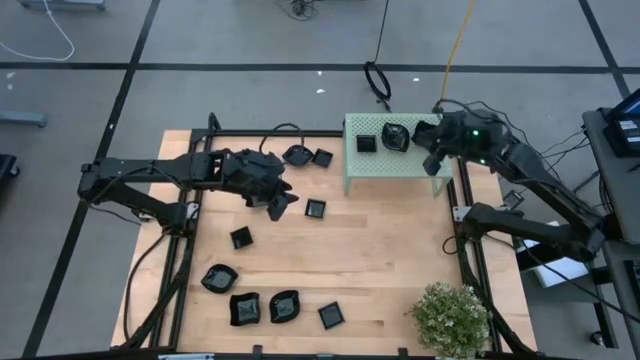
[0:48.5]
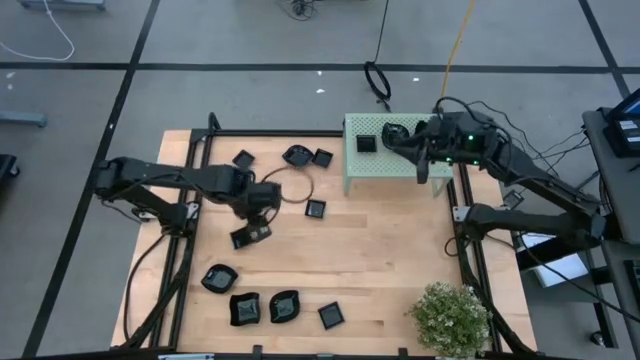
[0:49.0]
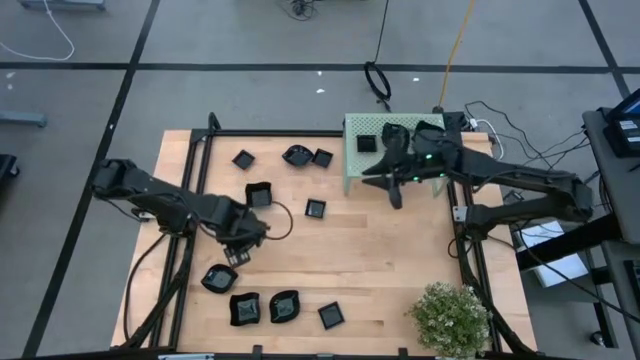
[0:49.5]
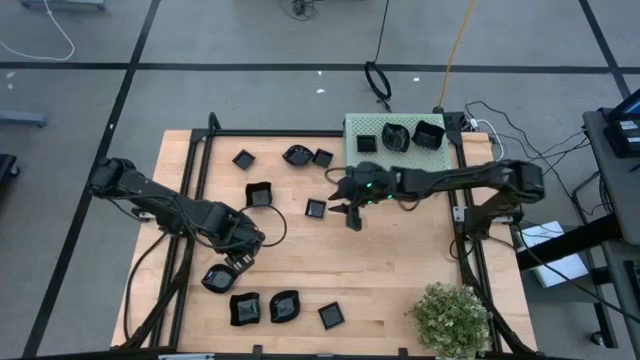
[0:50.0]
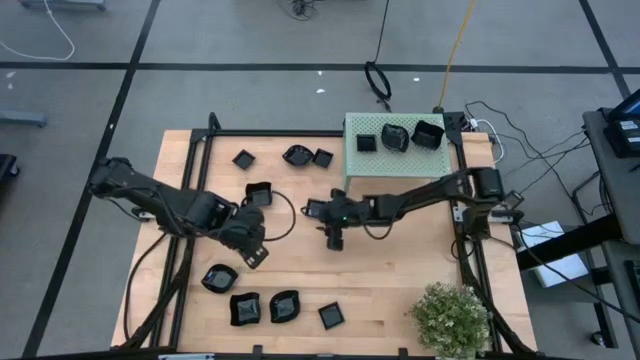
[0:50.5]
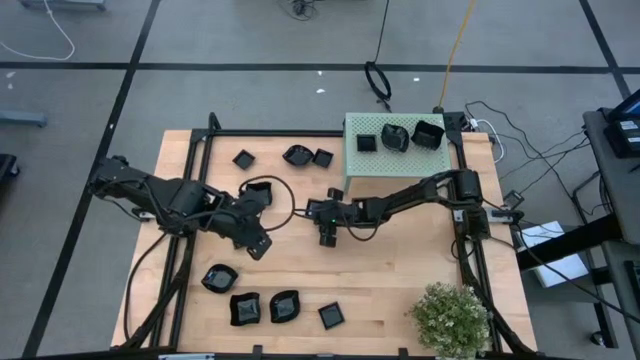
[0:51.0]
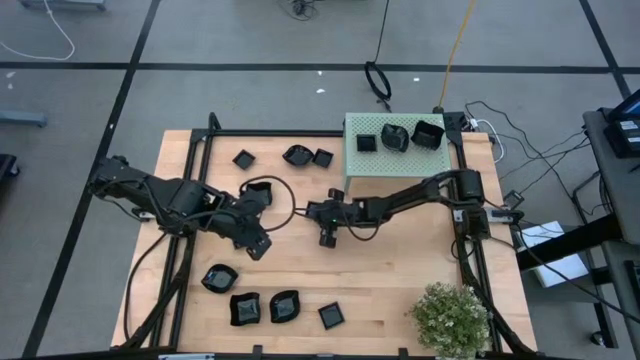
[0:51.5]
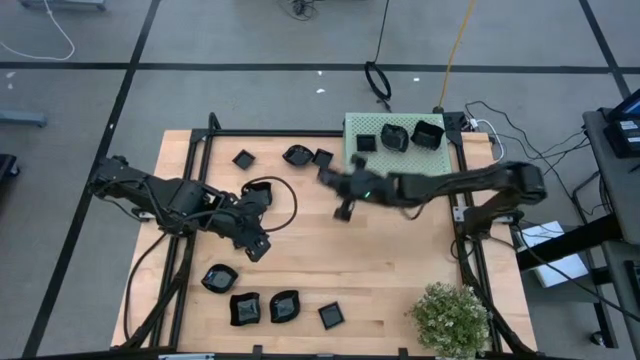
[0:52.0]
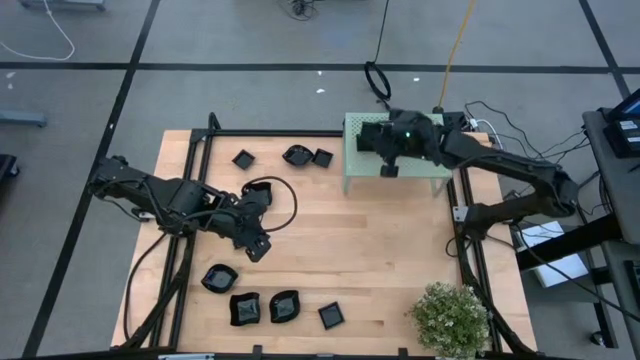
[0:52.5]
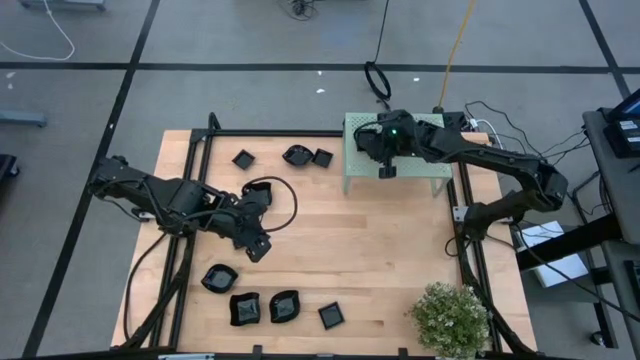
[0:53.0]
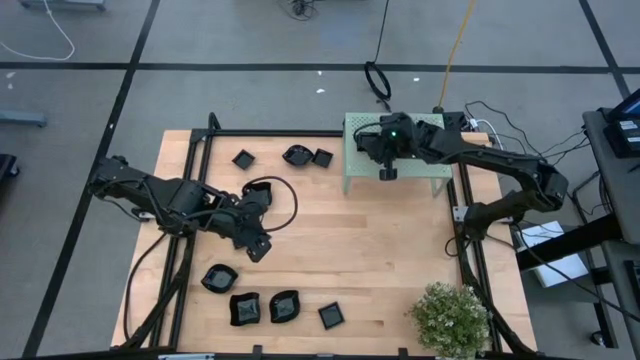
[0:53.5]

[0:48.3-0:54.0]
Task: Pick & Place Mini shaped plates
Stack the square plate on top of the square plate on the shelf

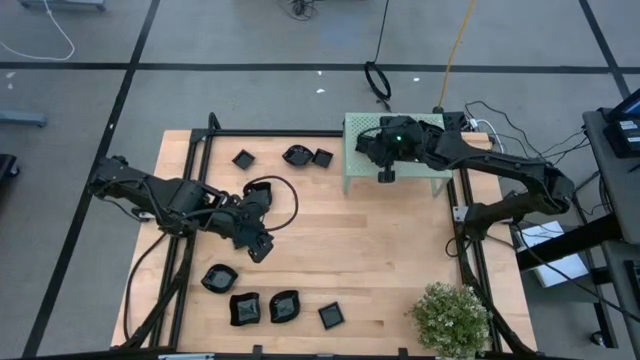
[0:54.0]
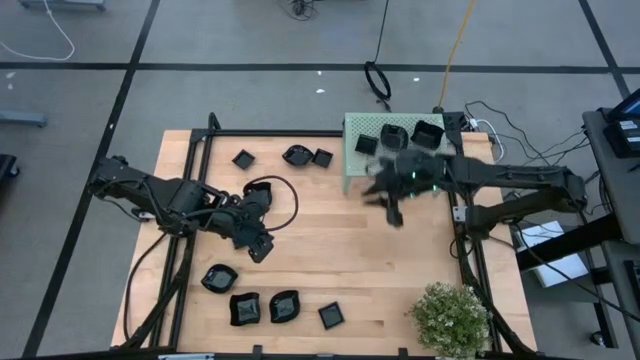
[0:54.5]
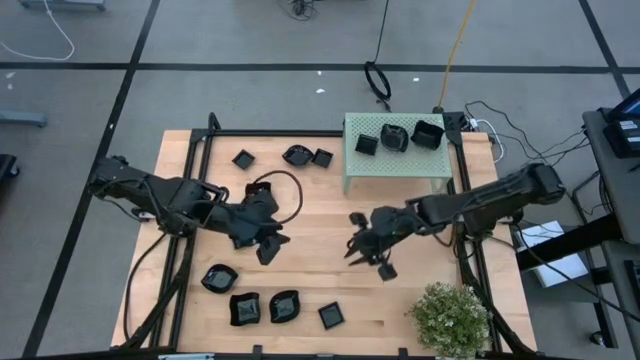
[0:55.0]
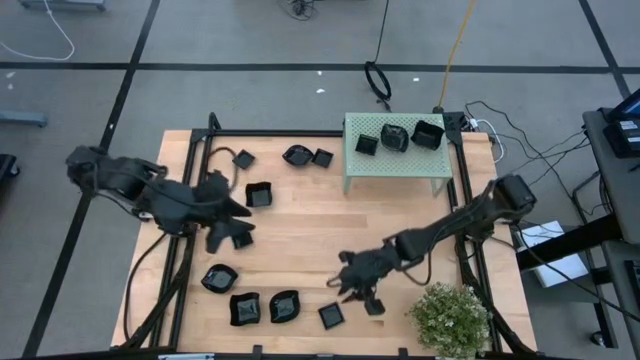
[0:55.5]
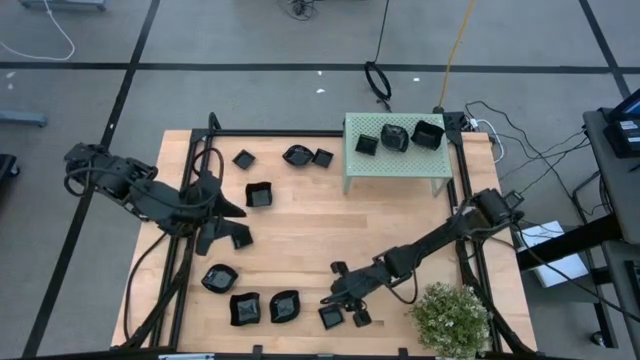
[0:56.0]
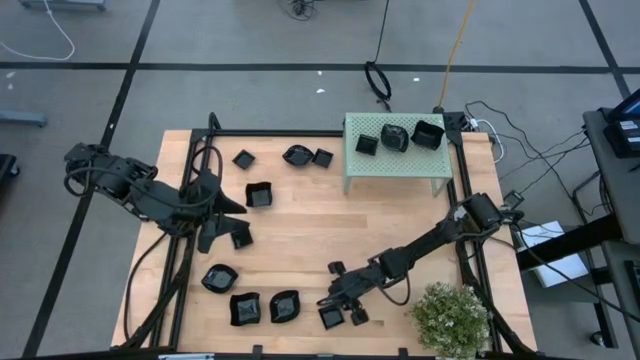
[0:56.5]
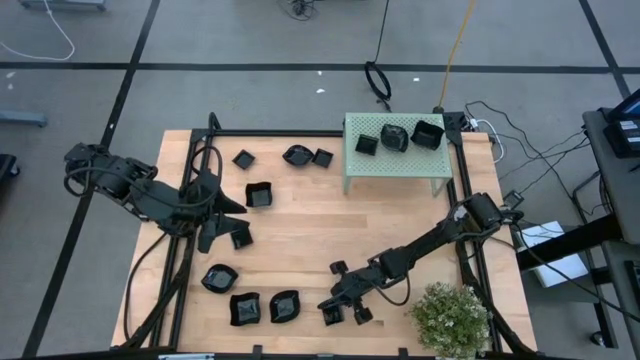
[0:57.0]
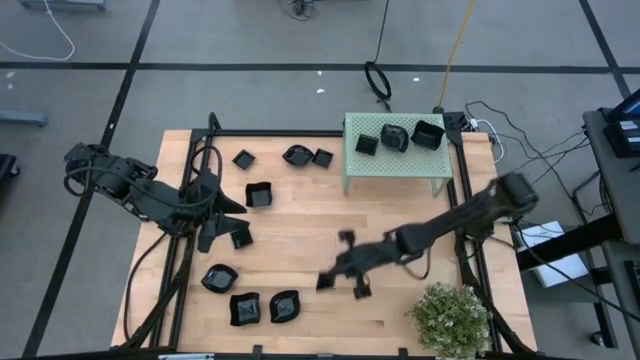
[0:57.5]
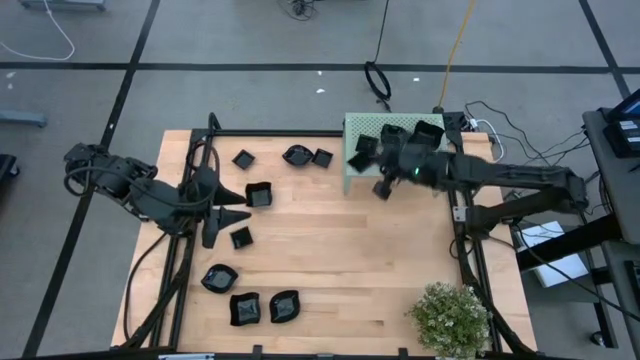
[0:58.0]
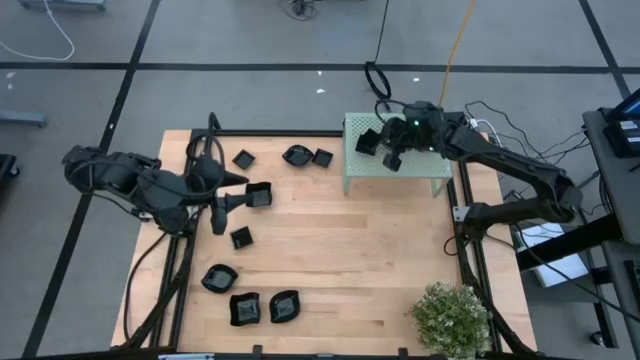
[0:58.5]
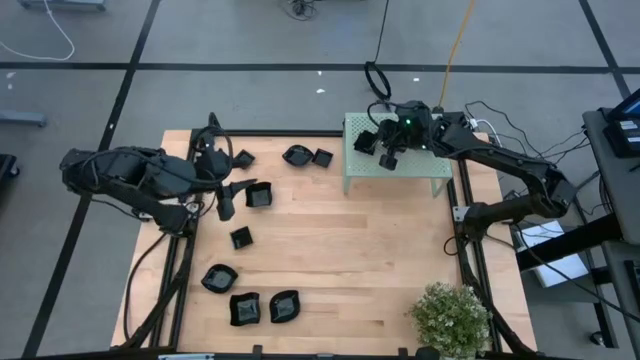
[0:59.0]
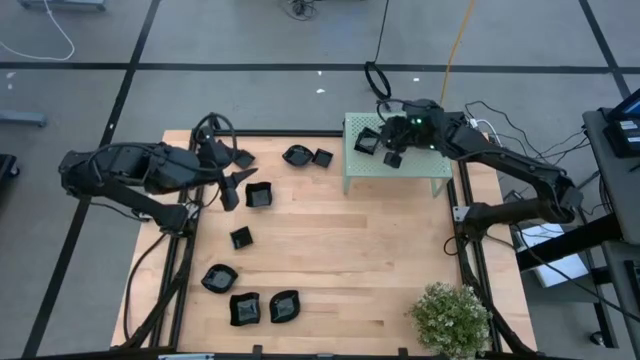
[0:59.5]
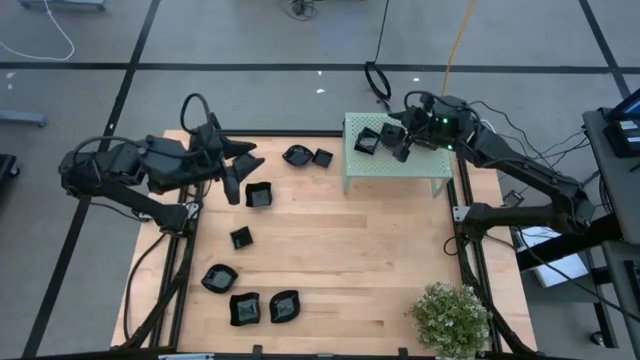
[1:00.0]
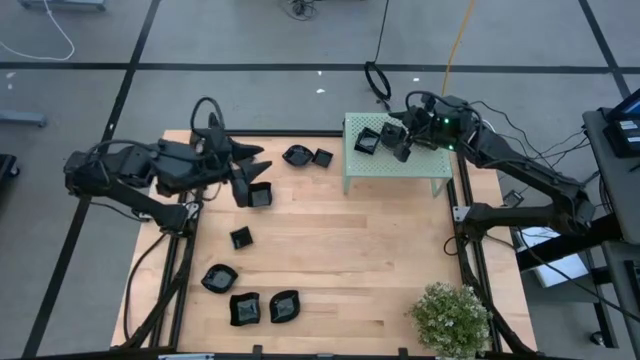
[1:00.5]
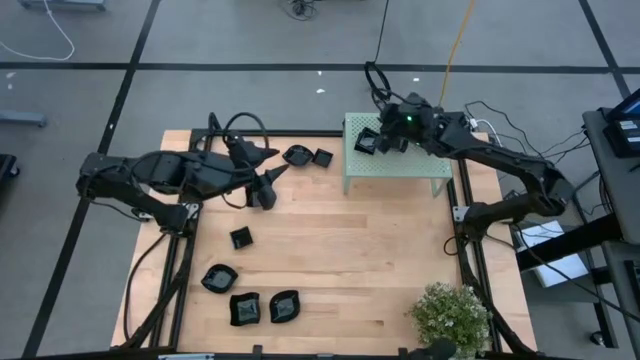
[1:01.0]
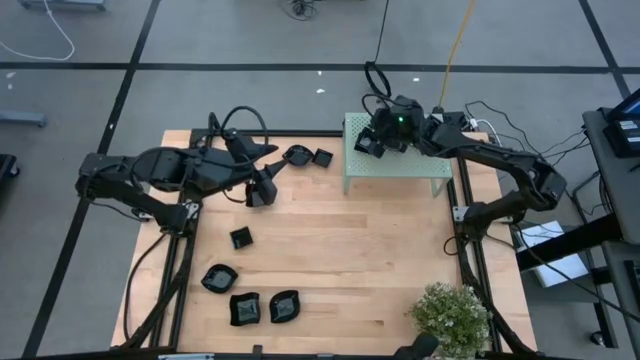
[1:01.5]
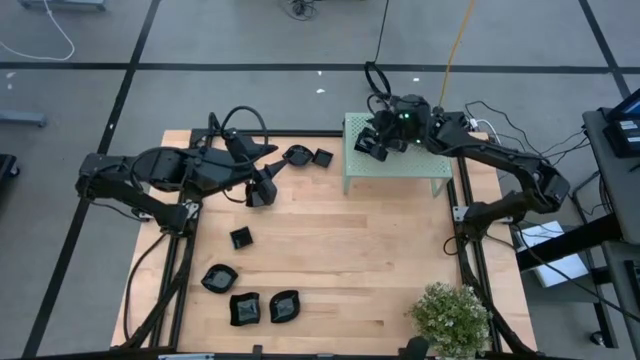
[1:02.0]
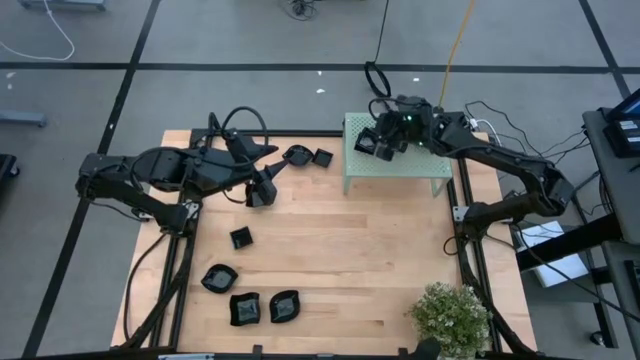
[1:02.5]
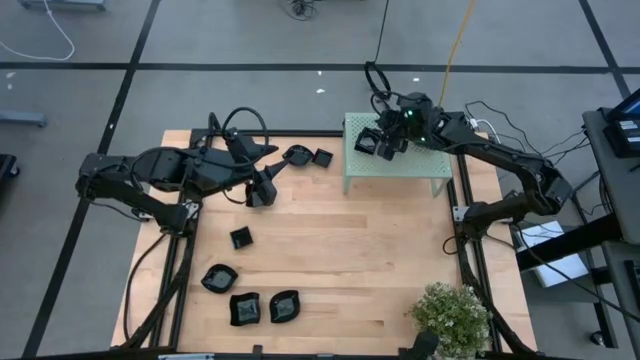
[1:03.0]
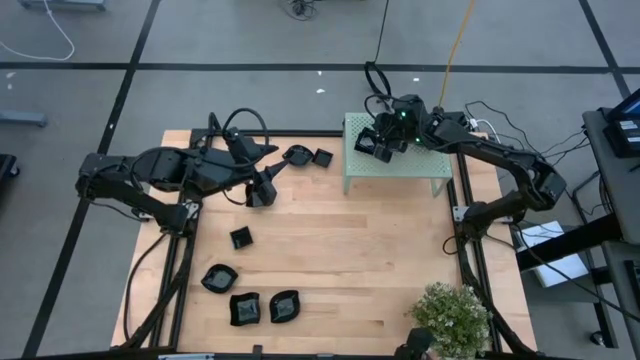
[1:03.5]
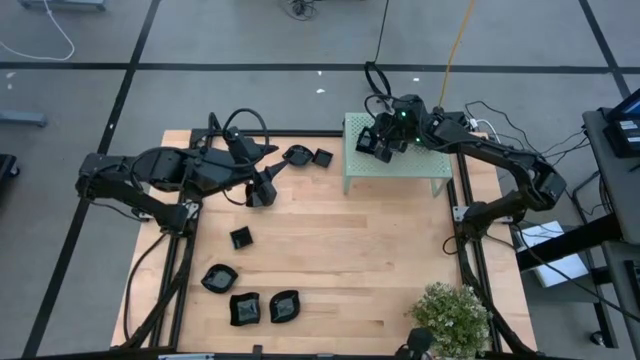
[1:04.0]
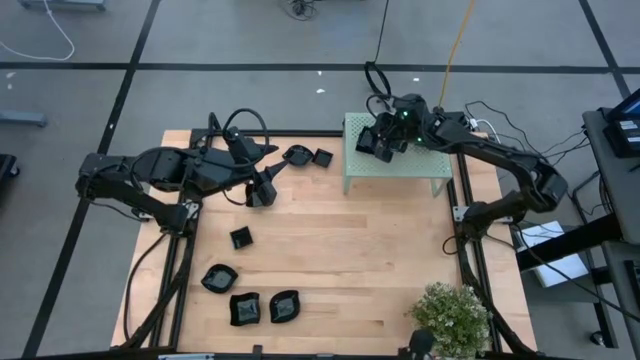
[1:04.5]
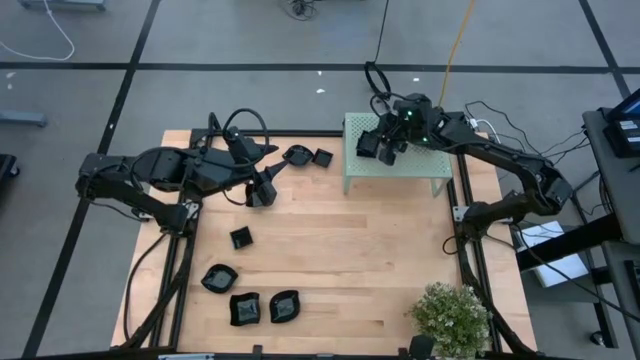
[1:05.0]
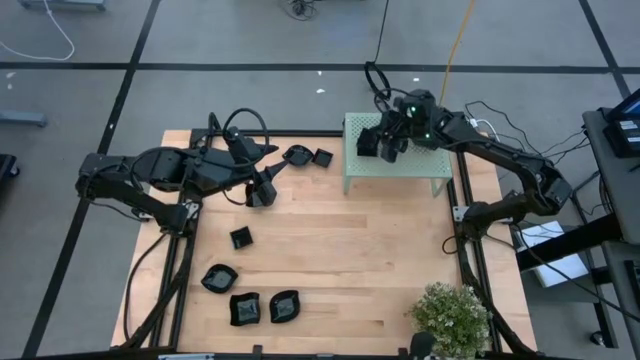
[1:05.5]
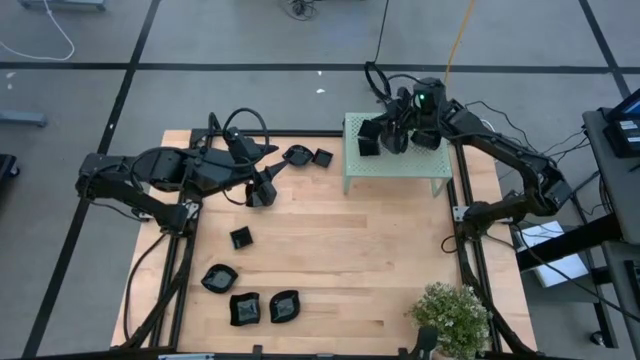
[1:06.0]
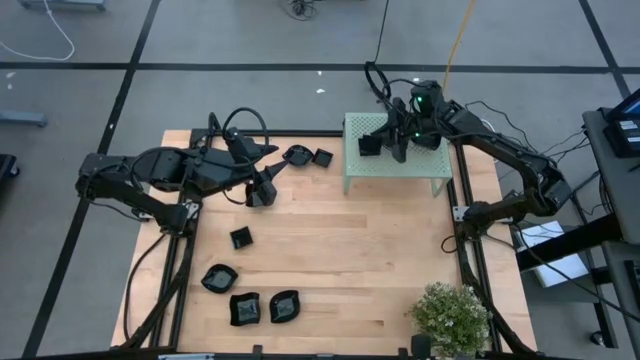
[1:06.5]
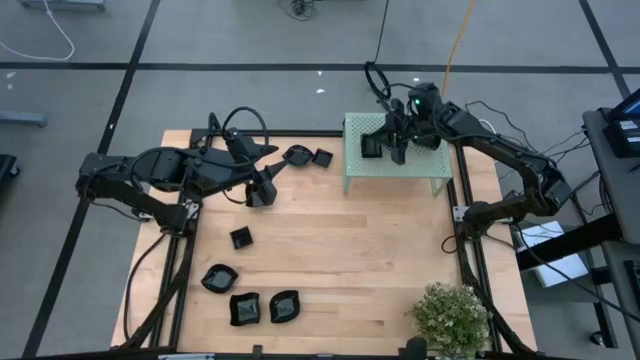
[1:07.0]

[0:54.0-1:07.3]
Stack the square plate on top of the square plate on the shelf

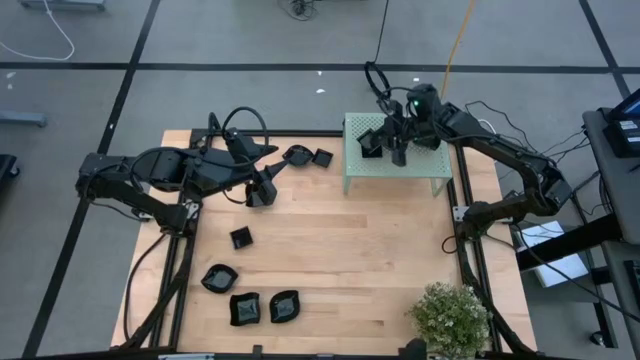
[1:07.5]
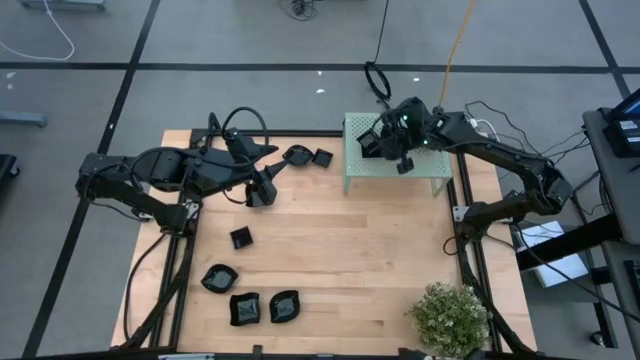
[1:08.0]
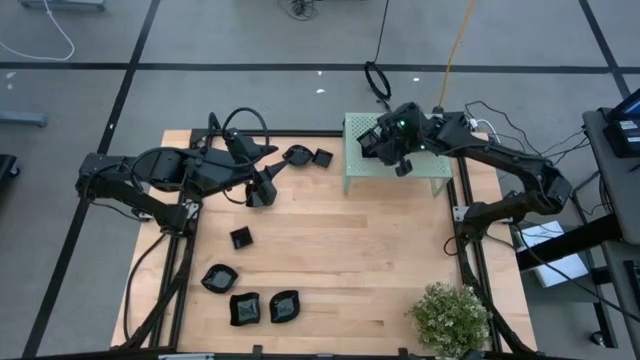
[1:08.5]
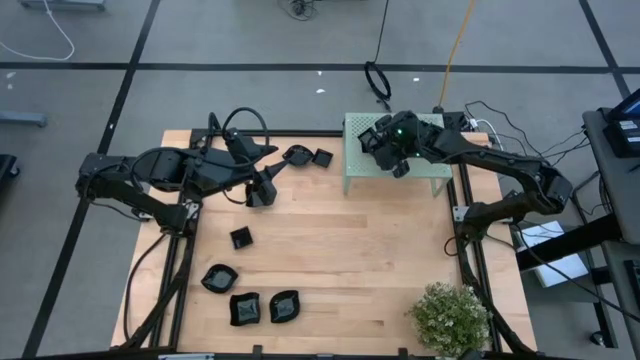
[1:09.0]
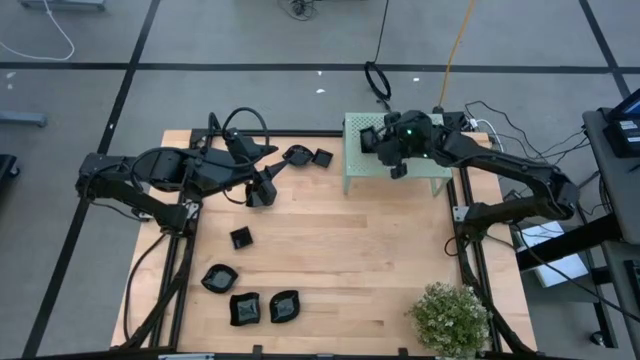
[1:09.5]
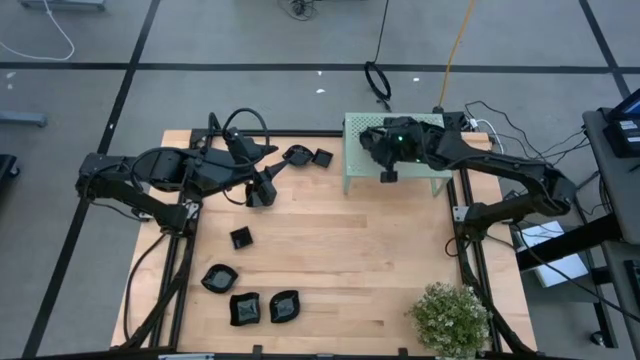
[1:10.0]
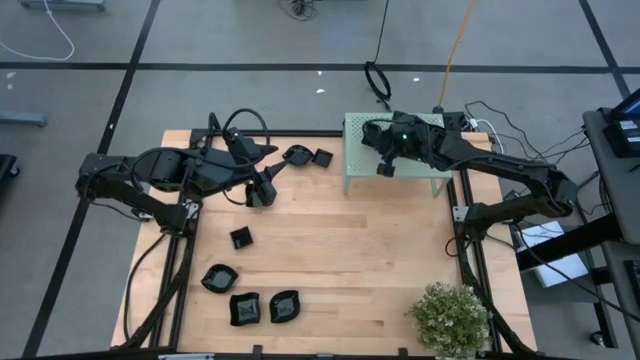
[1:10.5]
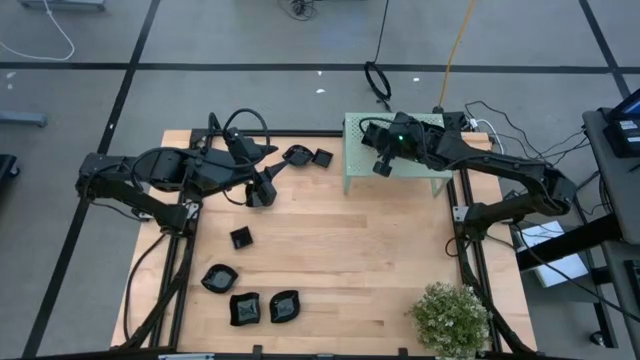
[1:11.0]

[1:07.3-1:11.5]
Stack the square plate on top of the square plate on the shelf
